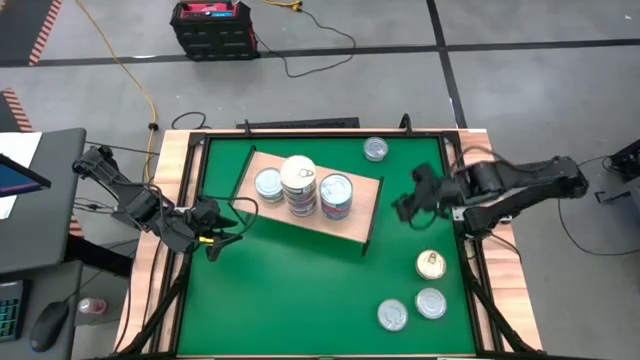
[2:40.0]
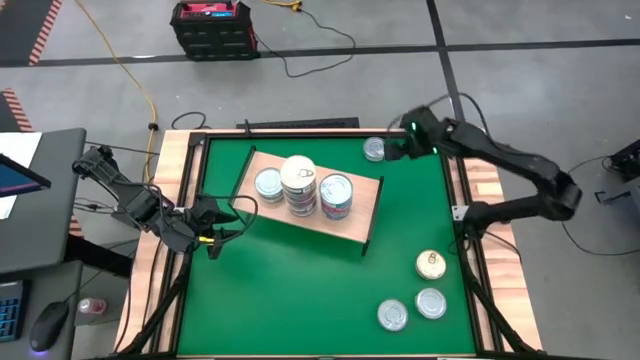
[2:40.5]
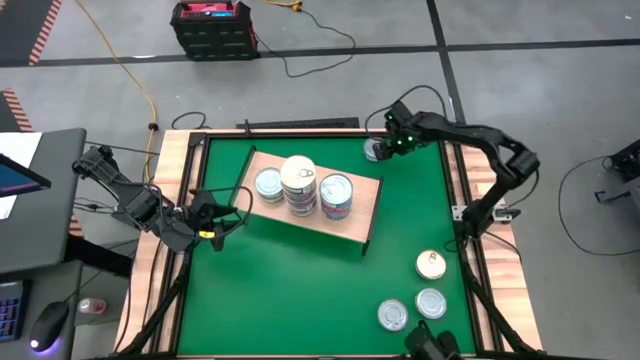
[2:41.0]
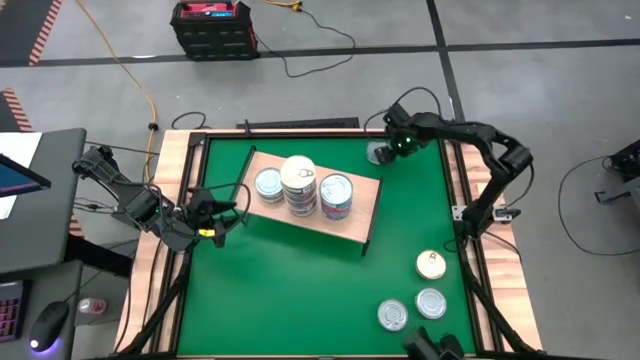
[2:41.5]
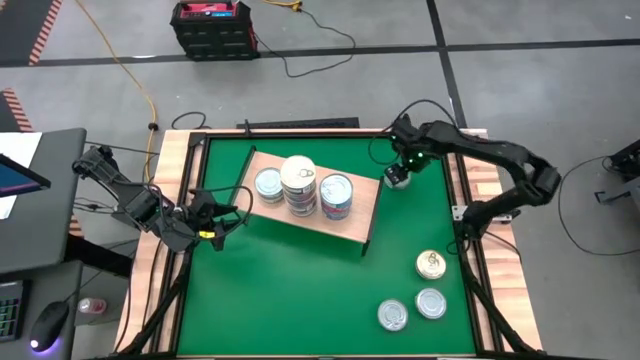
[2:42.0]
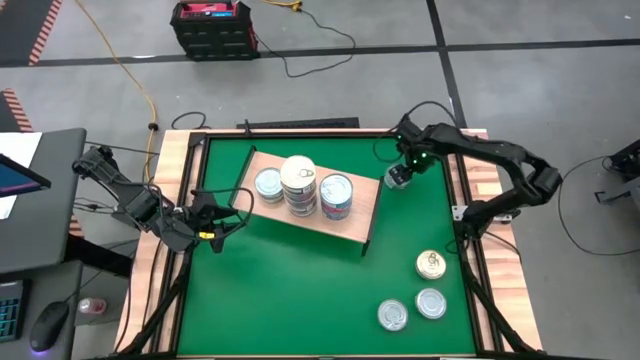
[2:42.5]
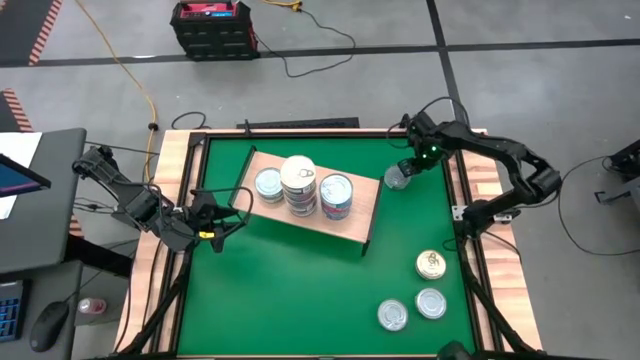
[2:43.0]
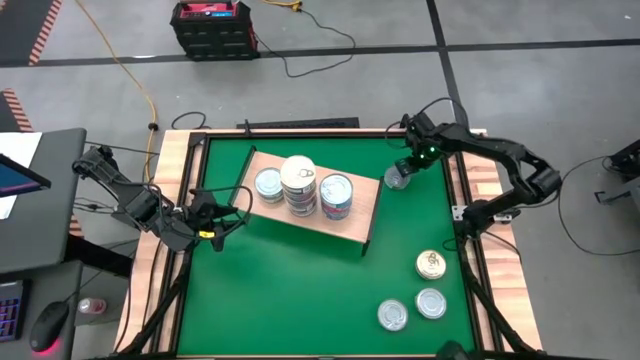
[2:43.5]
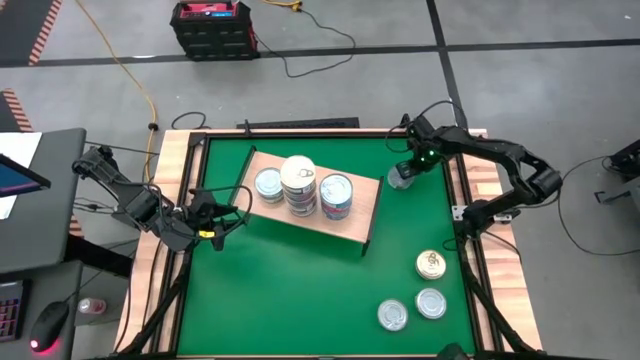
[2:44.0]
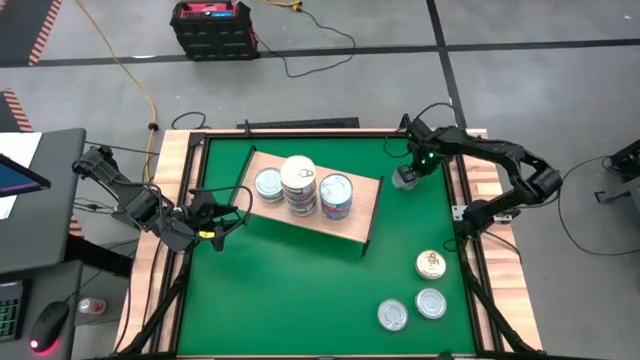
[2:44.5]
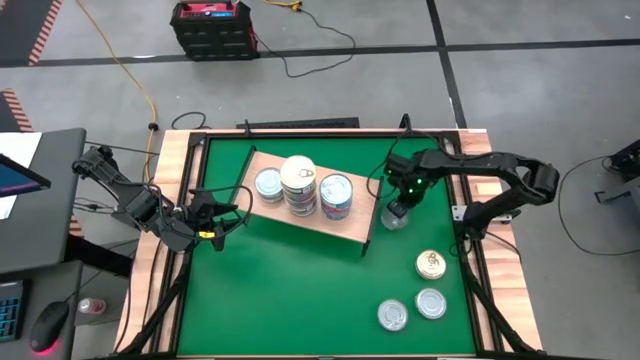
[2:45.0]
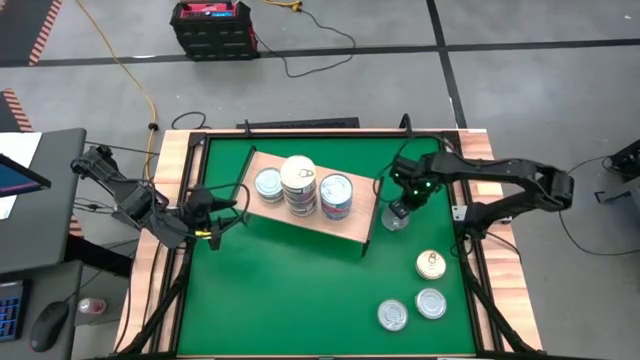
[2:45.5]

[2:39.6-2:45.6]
Task: Stack canned seafood by type on shelf
Move the green tuna can to the middle right of the table

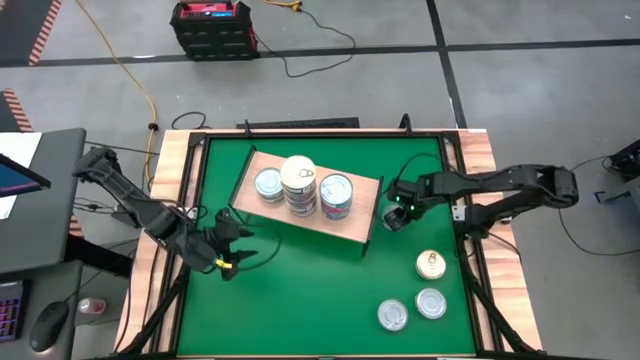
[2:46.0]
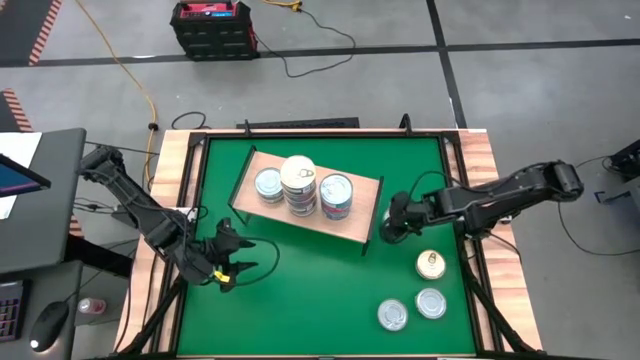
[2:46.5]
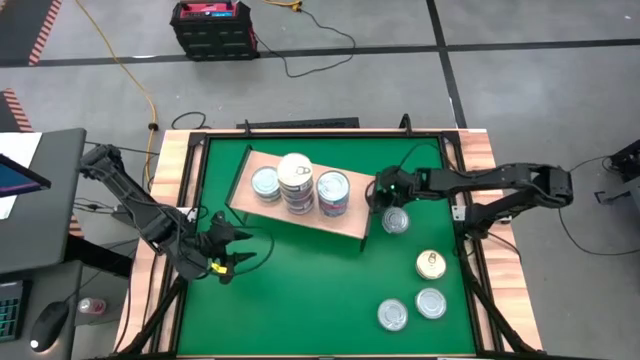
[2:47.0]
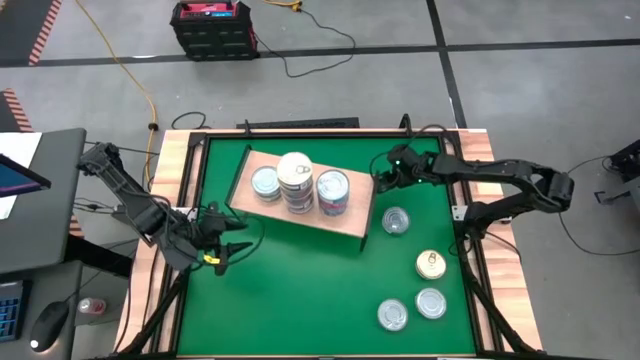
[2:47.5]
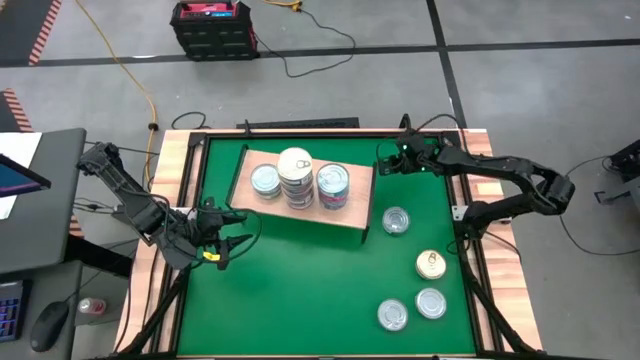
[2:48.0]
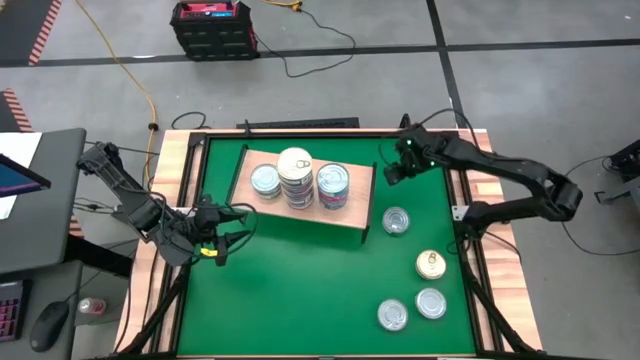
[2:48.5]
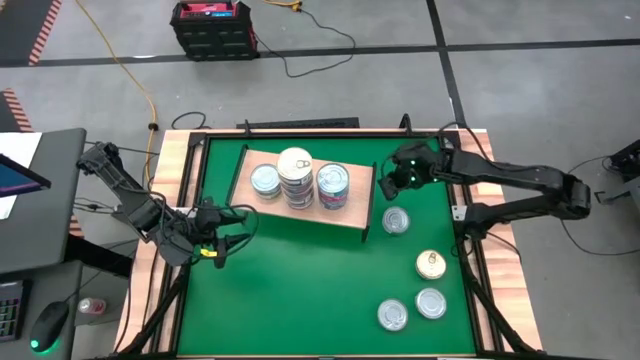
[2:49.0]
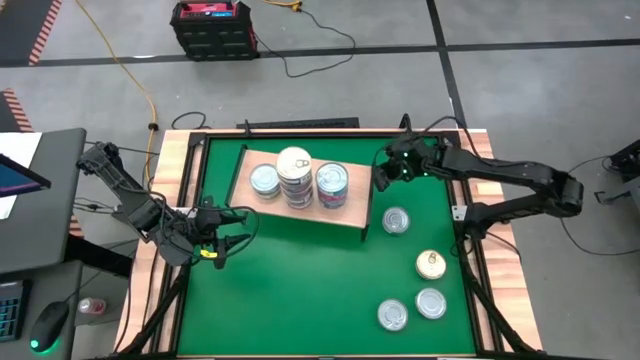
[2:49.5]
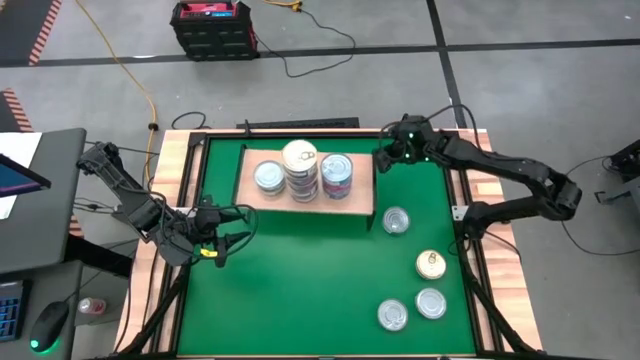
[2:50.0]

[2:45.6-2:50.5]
Adjust the shelf on the table

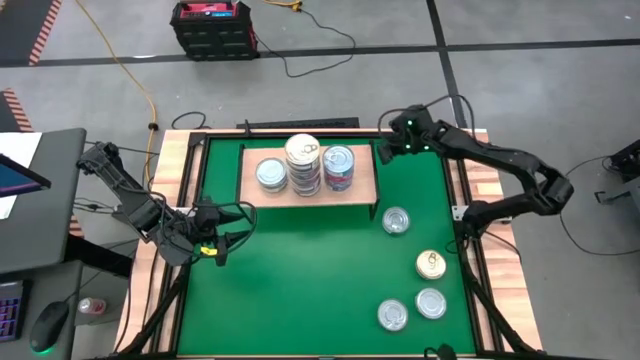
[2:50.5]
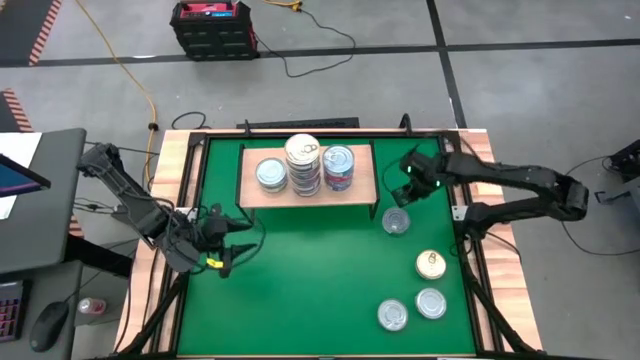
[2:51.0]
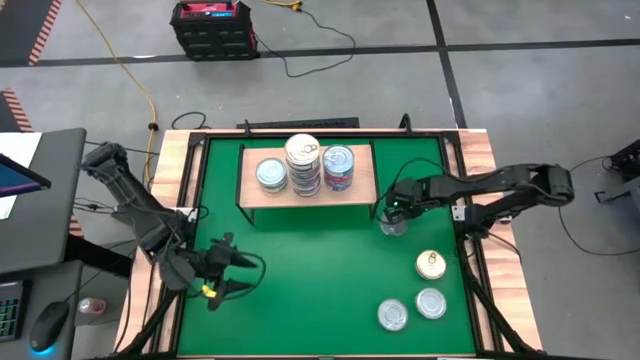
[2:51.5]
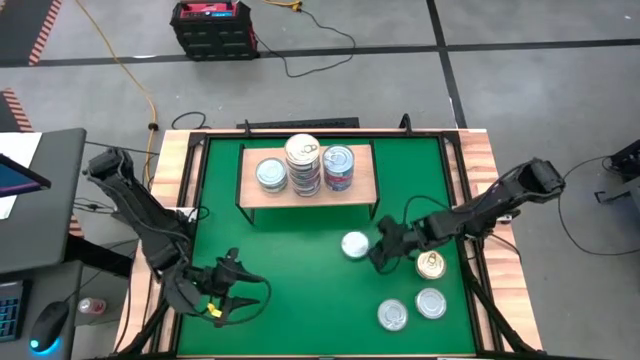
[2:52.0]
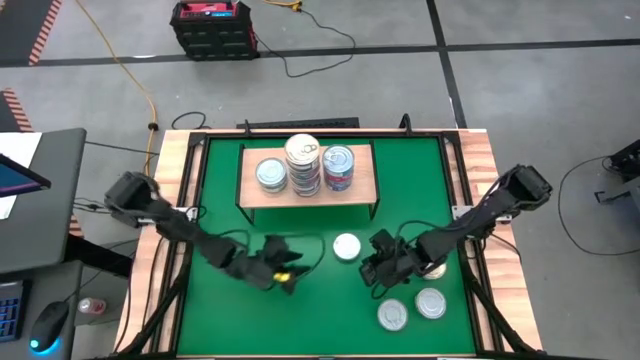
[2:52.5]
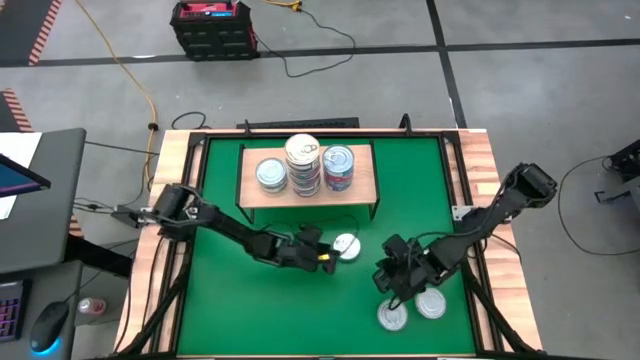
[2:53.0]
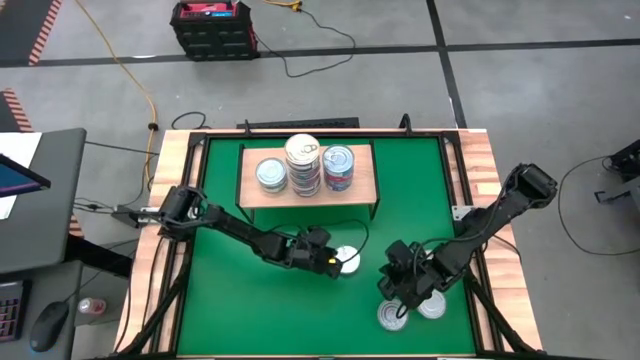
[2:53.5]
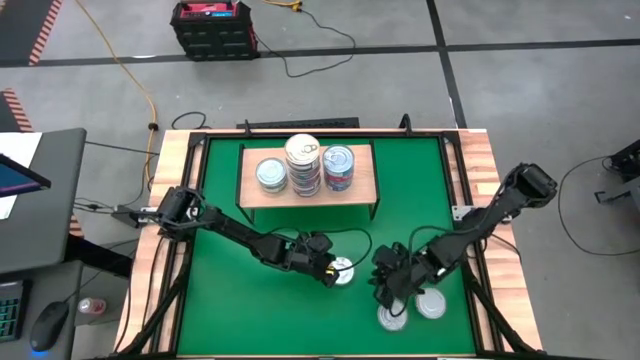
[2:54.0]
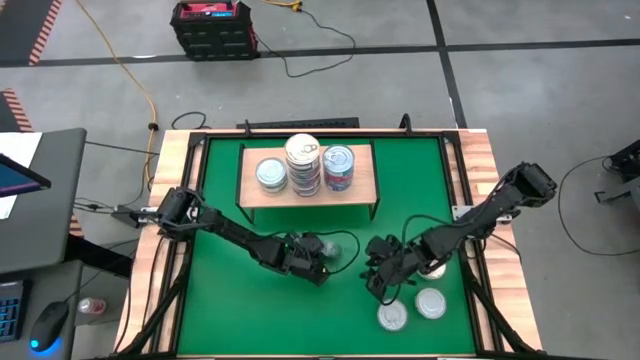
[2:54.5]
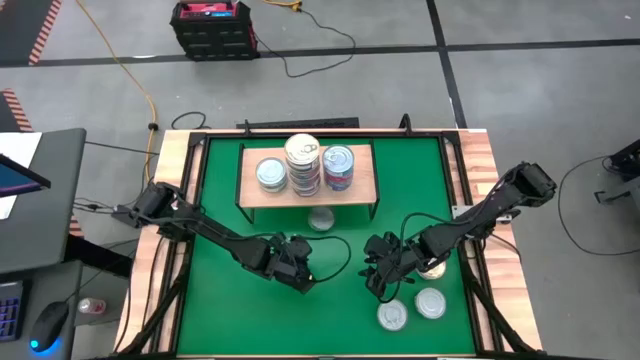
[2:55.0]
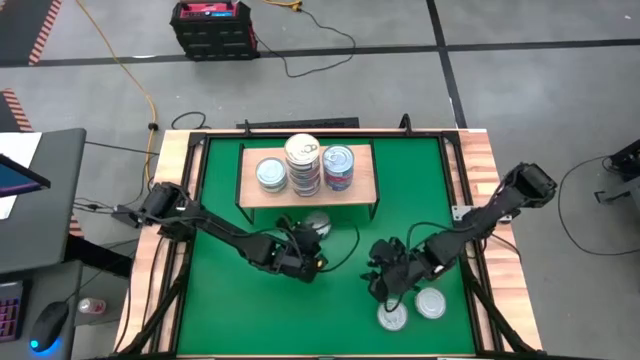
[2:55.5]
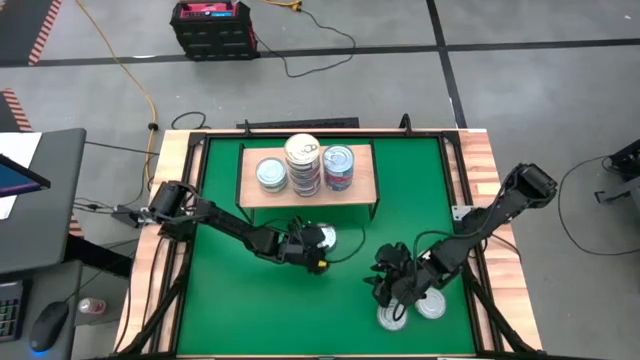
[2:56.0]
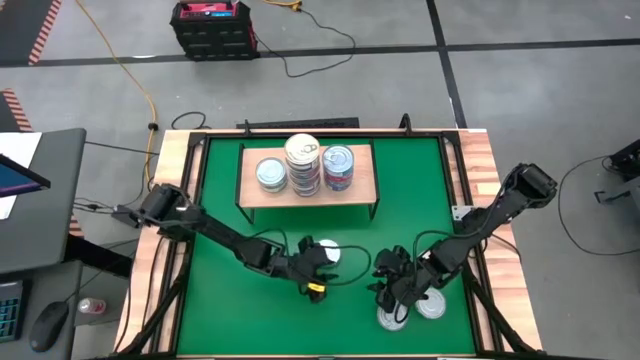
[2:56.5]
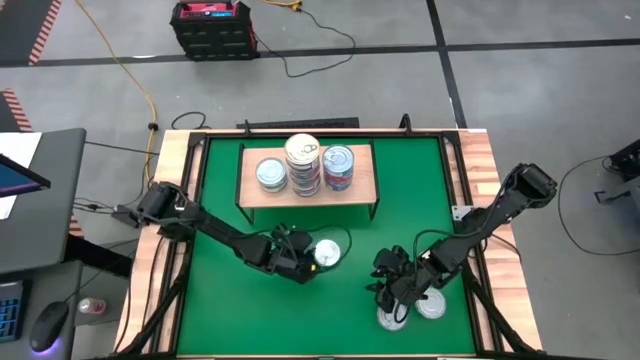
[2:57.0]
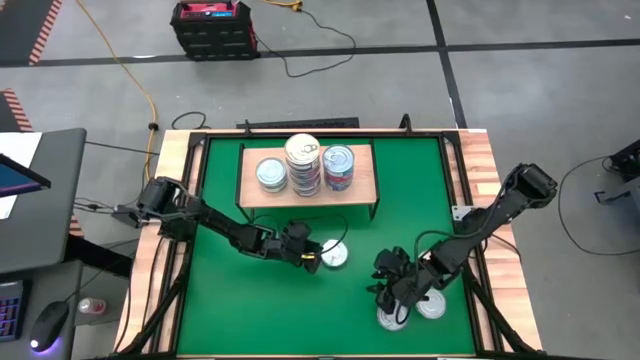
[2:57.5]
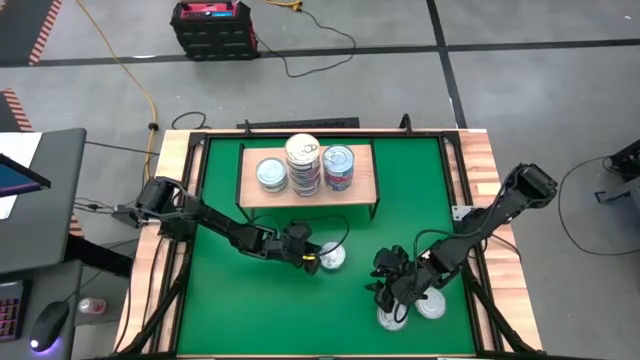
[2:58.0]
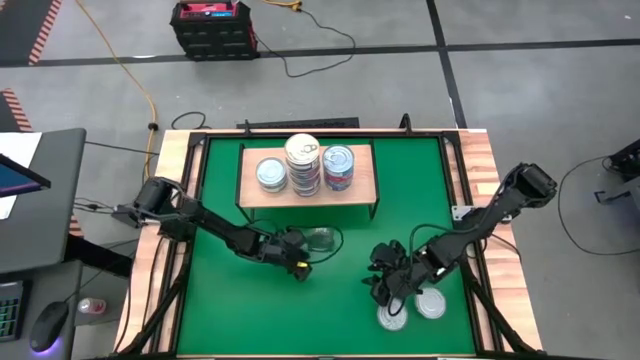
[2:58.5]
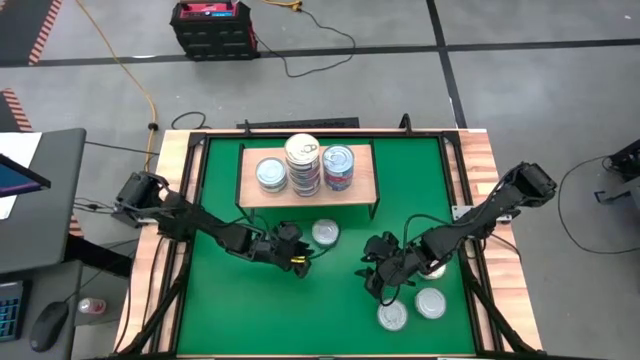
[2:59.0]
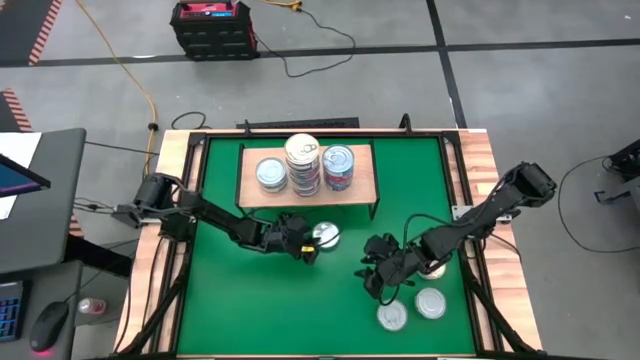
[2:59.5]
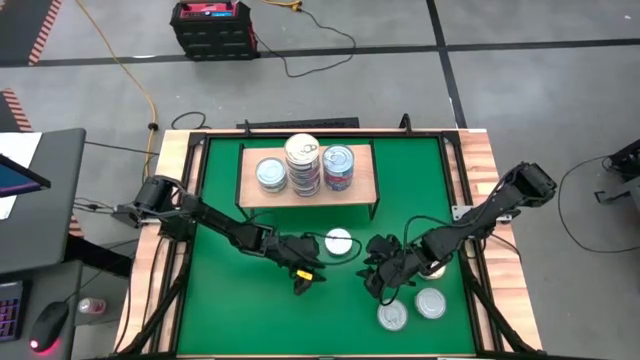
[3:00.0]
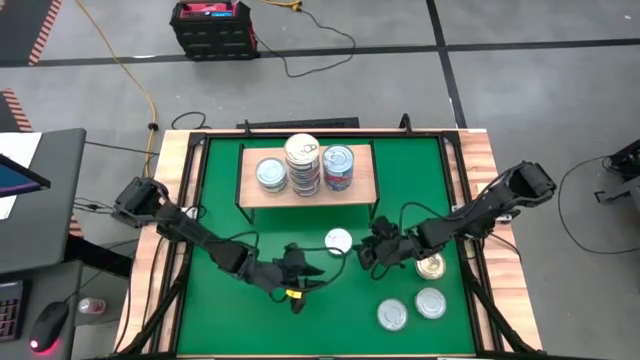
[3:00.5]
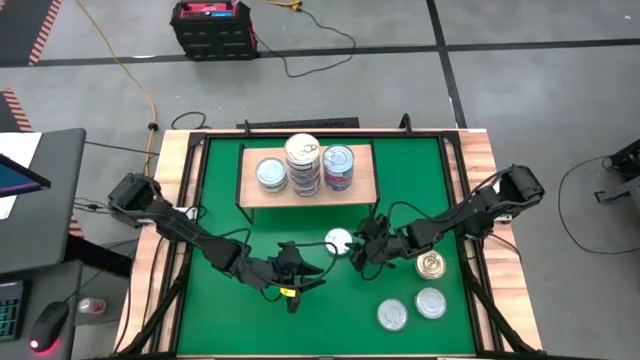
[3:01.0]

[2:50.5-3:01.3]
Stack the green tuna can on top of the colored tuna cans
